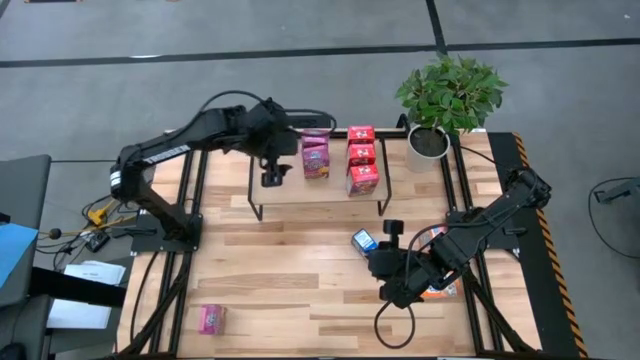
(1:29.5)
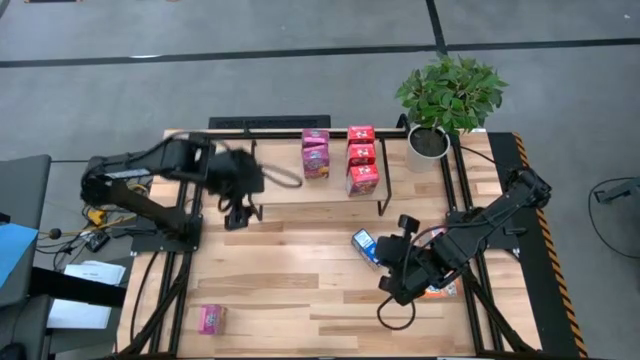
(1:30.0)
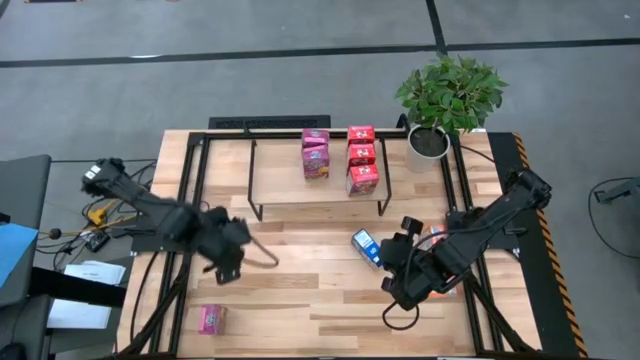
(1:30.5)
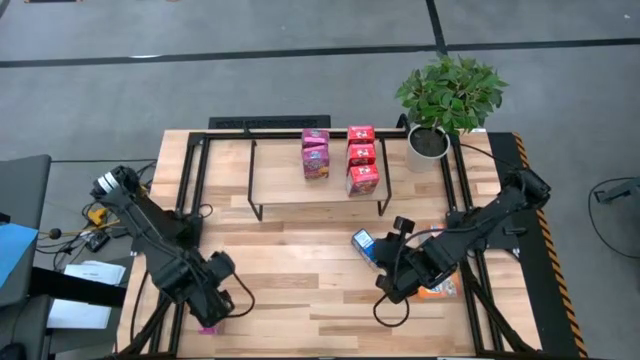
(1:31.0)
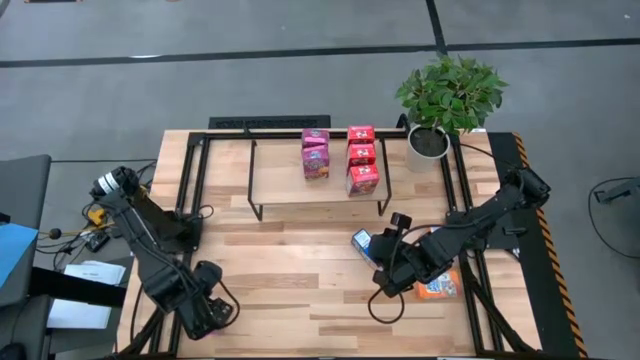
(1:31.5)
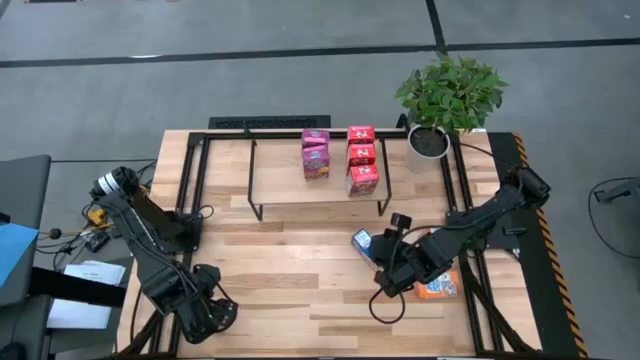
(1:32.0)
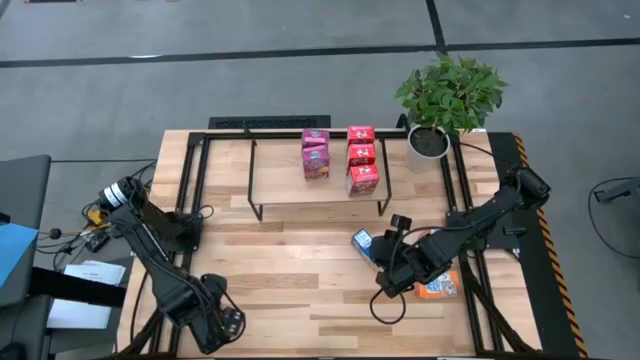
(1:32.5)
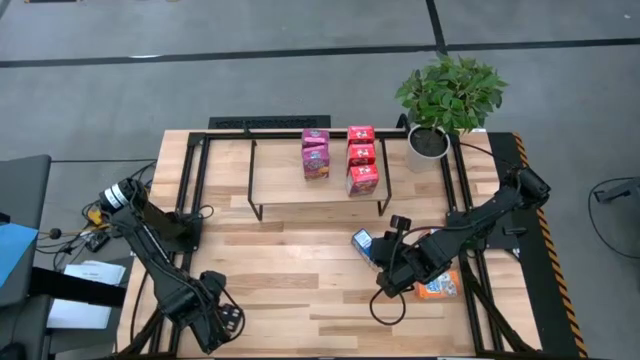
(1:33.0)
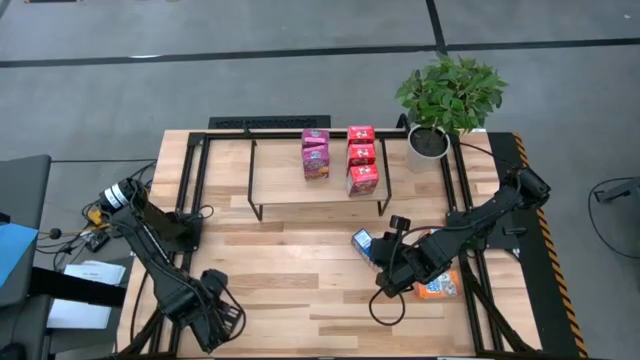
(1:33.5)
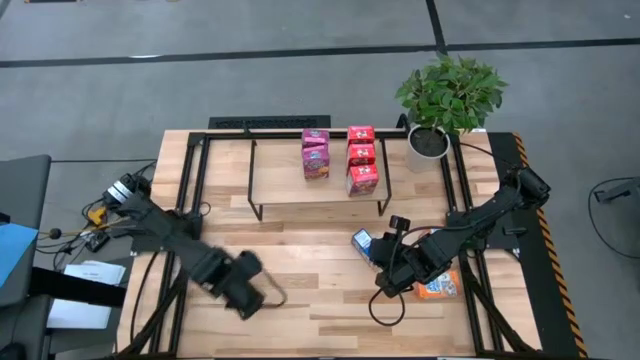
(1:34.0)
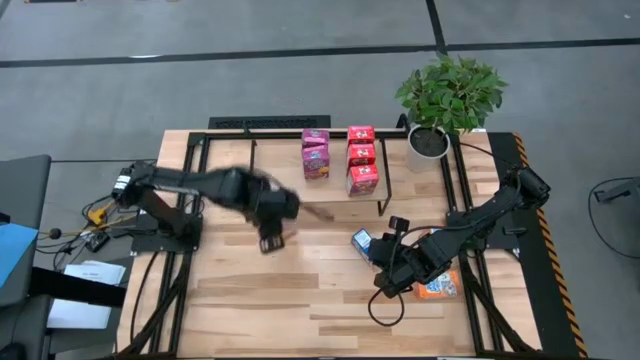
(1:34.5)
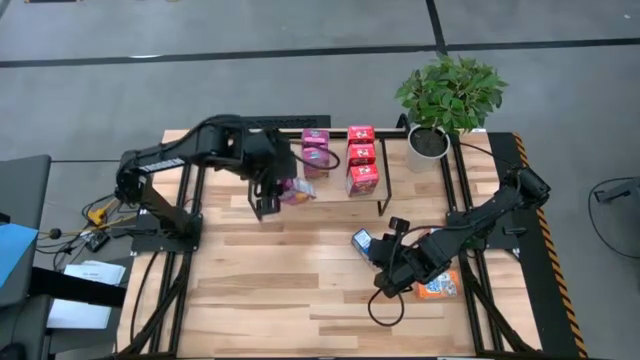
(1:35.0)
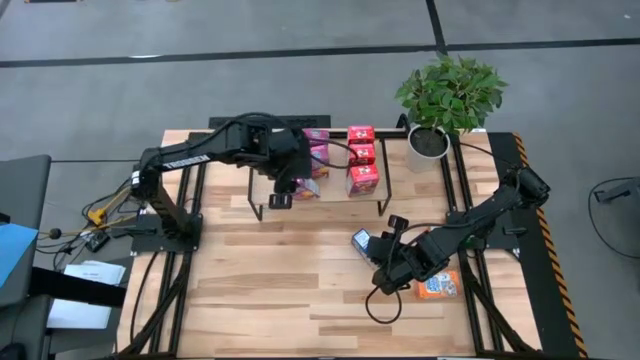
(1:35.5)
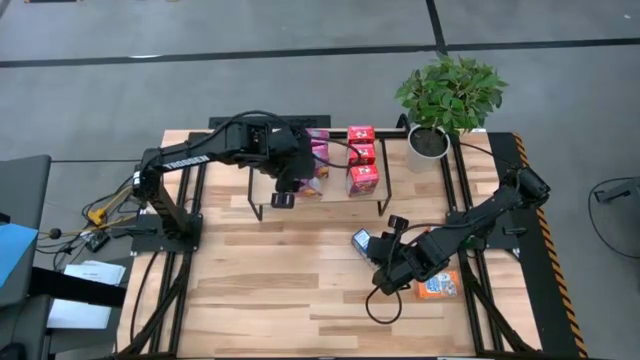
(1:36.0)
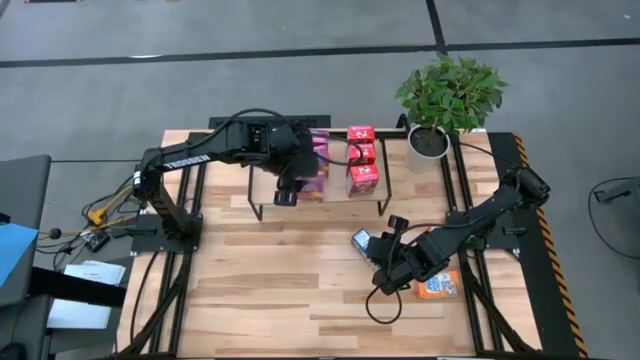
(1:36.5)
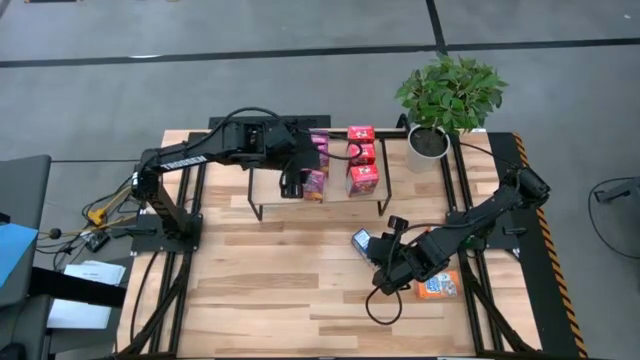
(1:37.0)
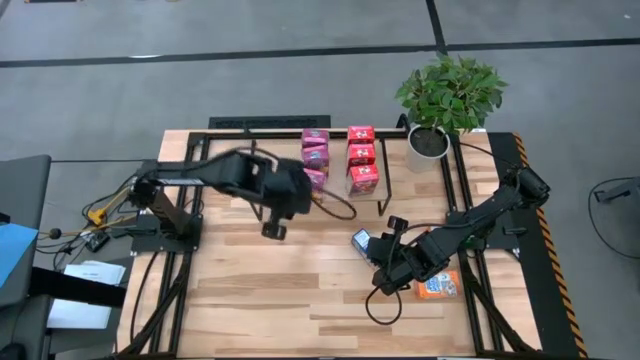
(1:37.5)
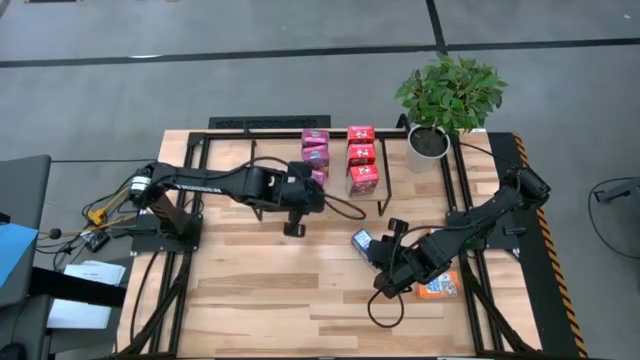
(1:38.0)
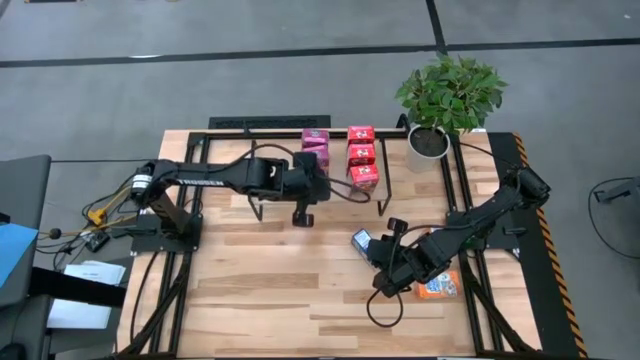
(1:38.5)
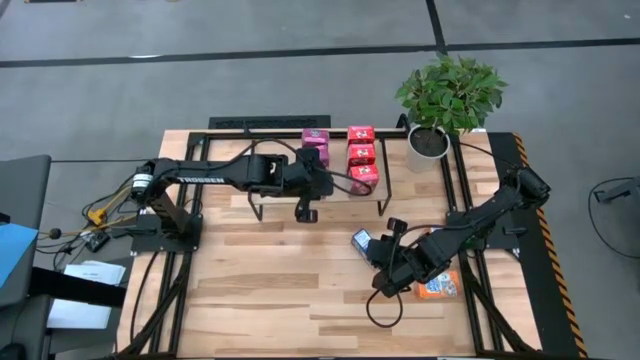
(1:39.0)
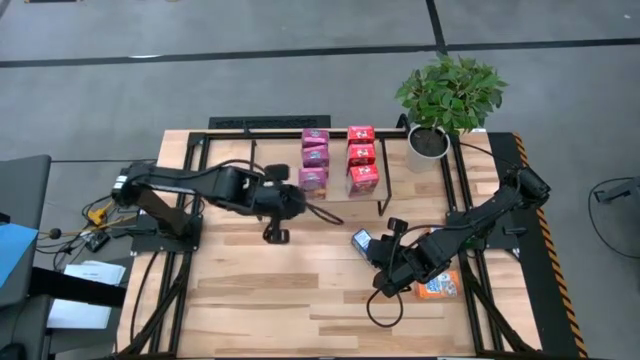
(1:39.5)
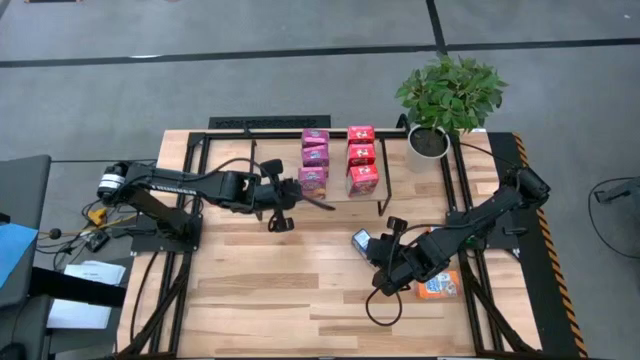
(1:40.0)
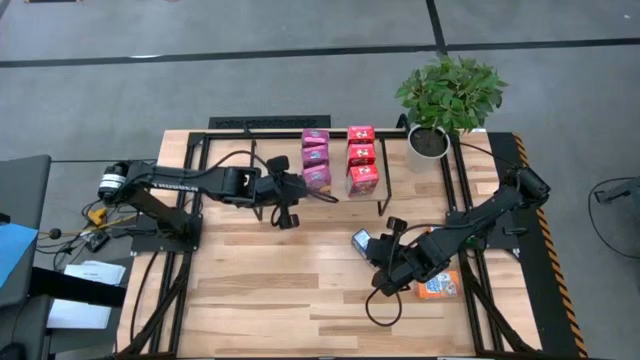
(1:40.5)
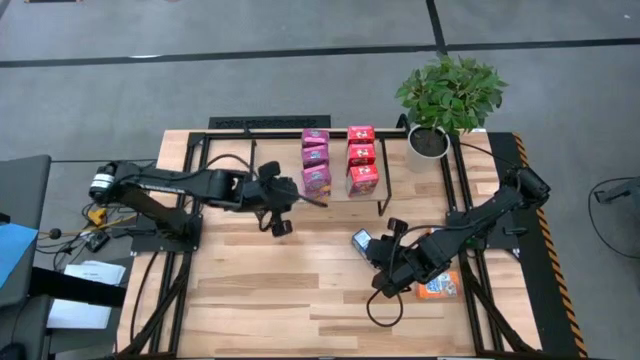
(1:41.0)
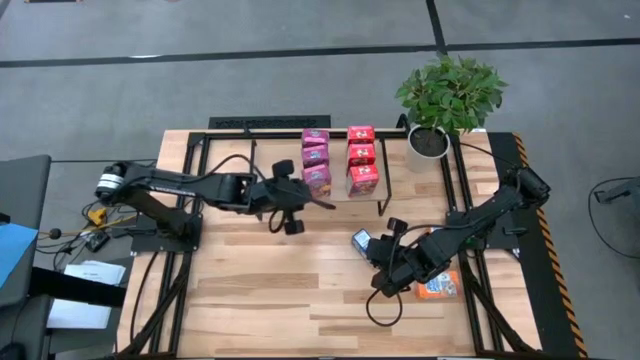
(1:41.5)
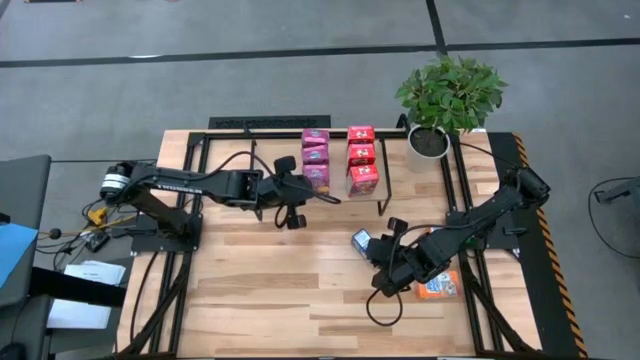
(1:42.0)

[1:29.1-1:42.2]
Task: Stack cereal on shelf
Put the purple cereal box on the shelf aligned with the other purple cereal boxes

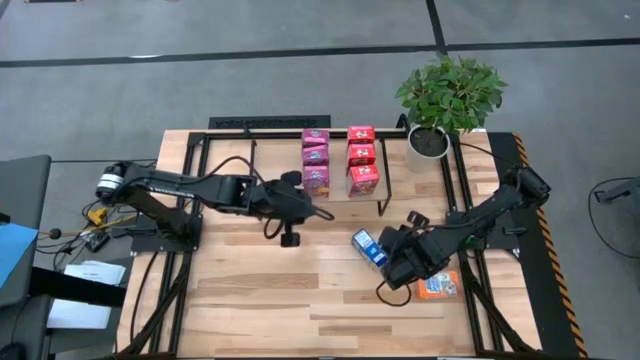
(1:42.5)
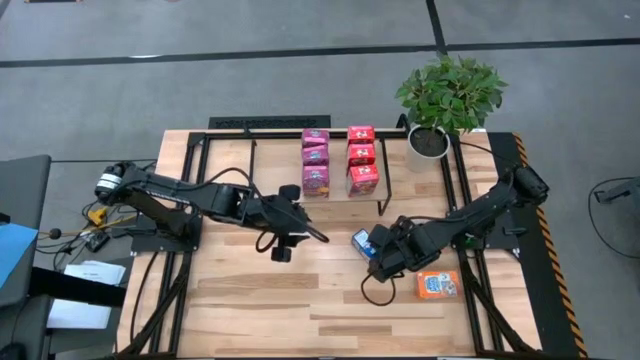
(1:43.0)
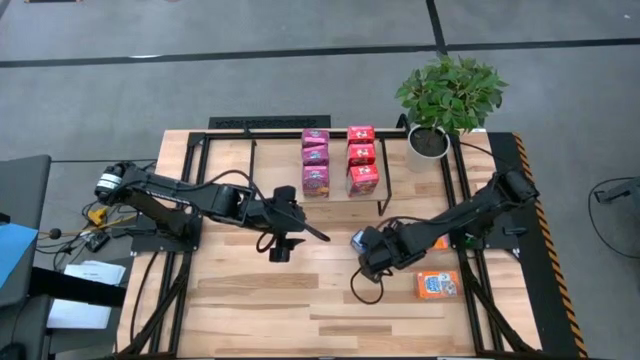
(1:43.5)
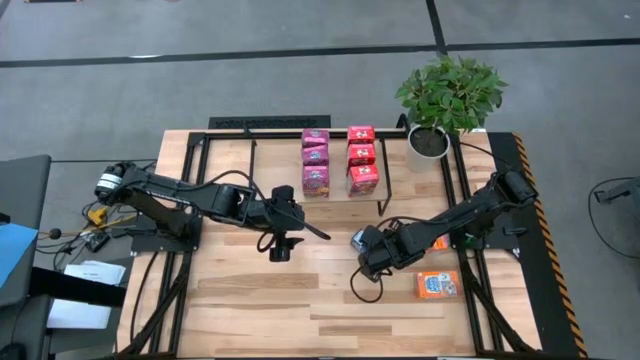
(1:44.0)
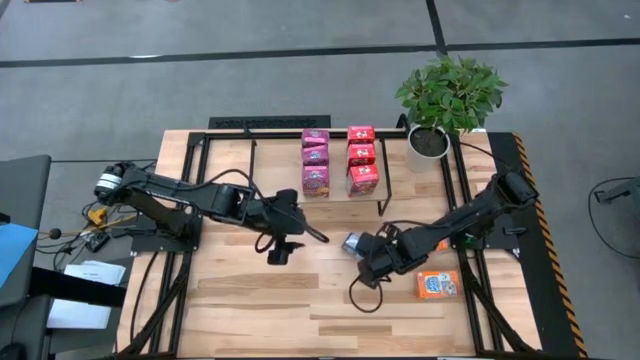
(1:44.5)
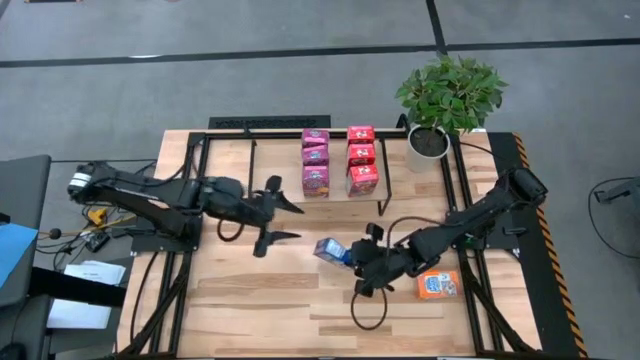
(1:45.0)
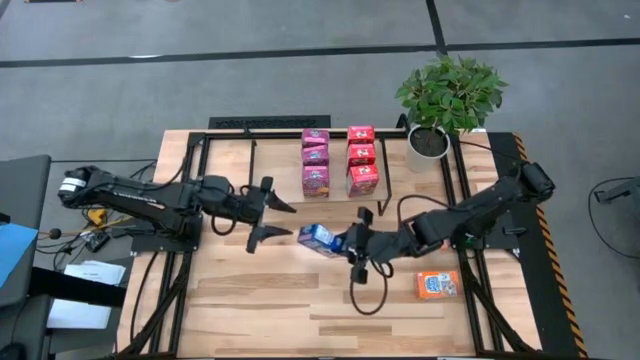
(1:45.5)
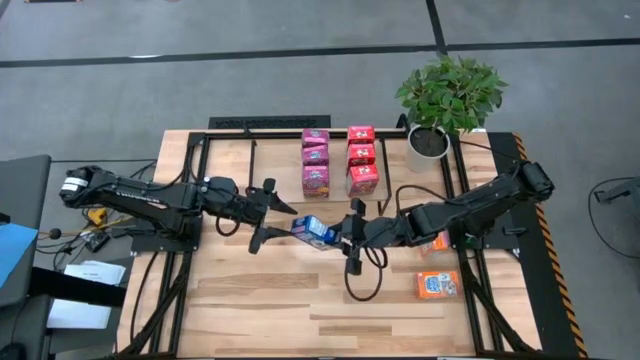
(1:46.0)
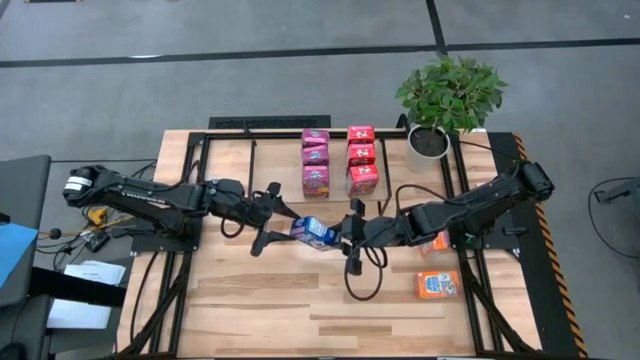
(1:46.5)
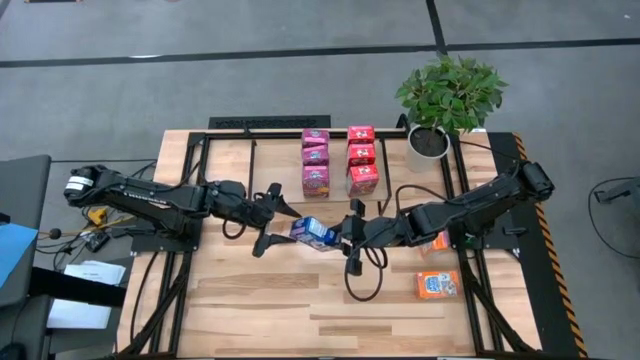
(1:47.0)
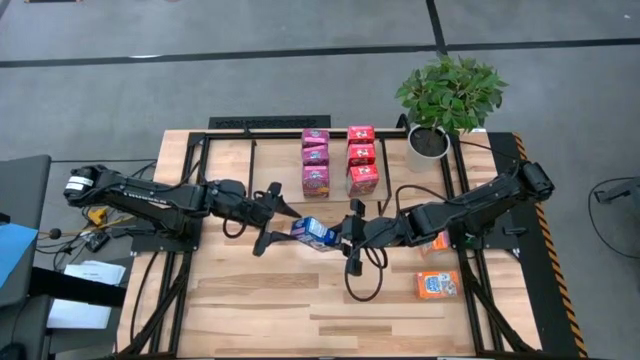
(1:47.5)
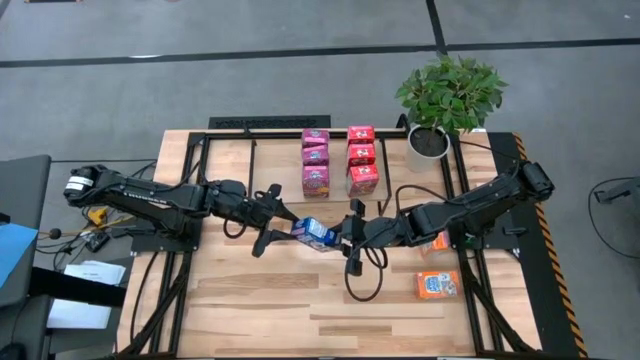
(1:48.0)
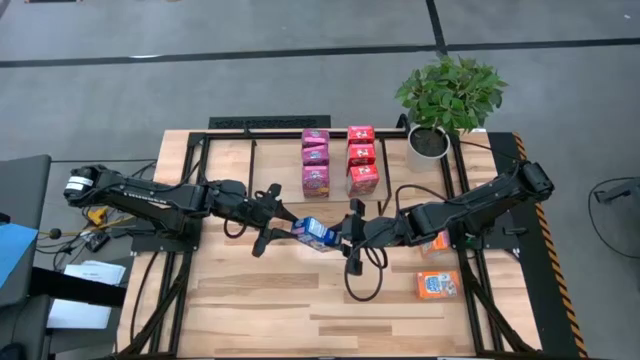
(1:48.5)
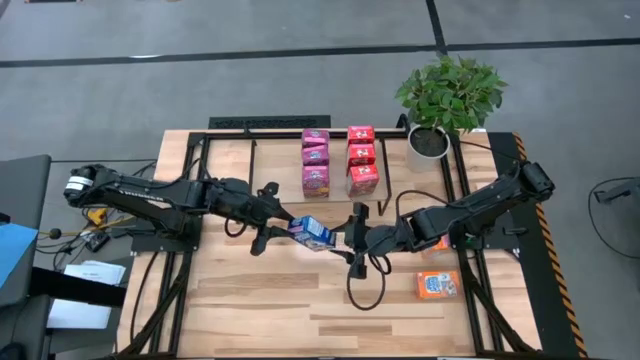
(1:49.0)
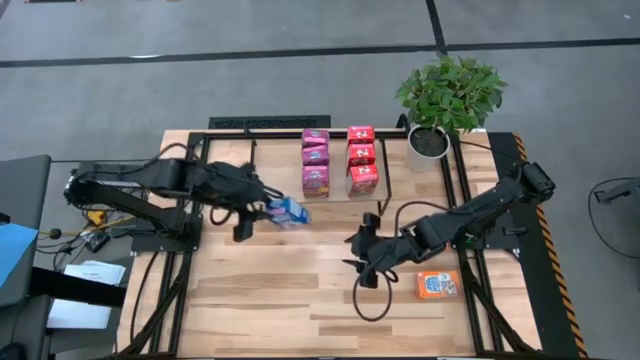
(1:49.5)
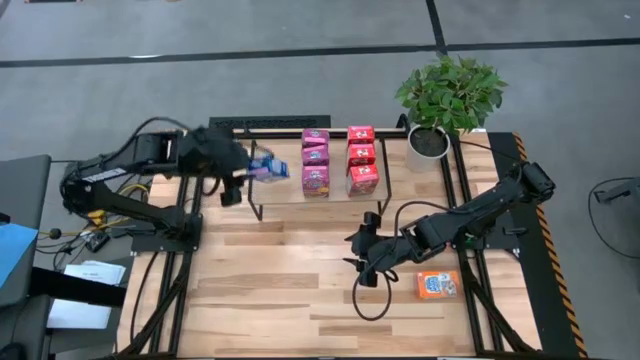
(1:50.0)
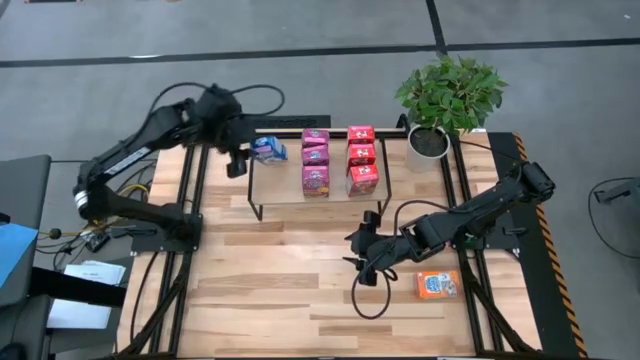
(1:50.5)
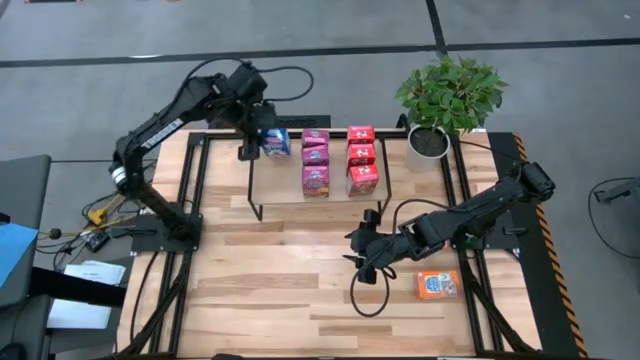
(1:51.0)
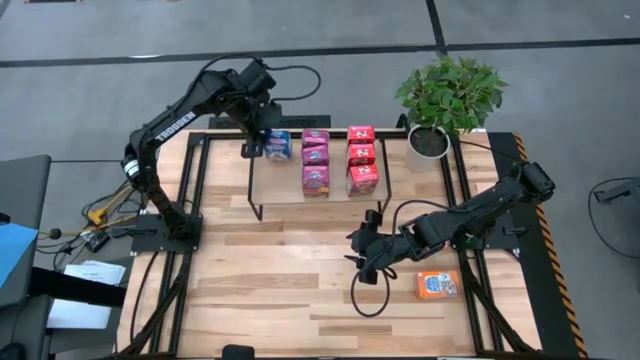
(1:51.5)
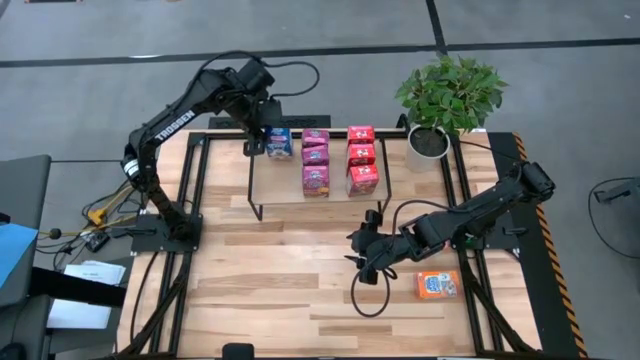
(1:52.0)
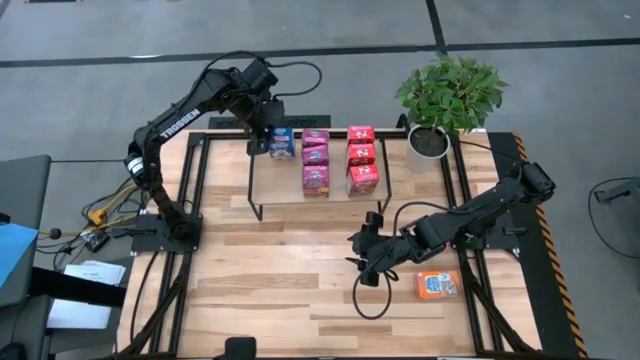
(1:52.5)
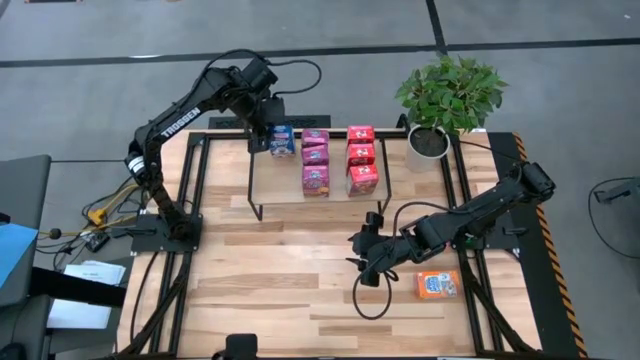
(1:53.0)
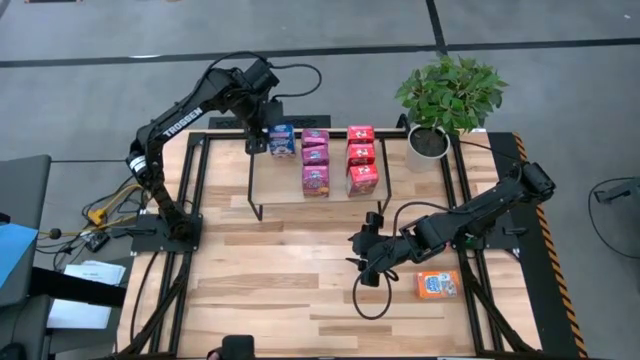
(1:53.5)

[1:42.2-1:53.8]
Put the blue cereal box on the shelf
